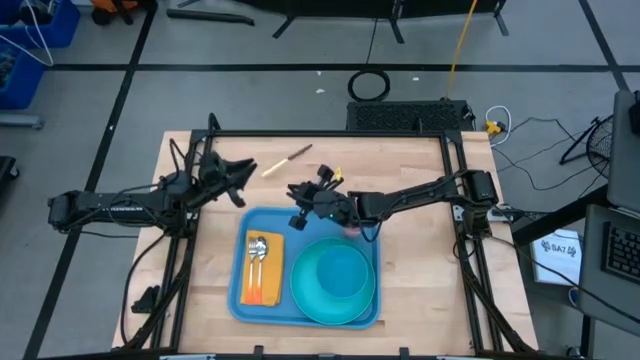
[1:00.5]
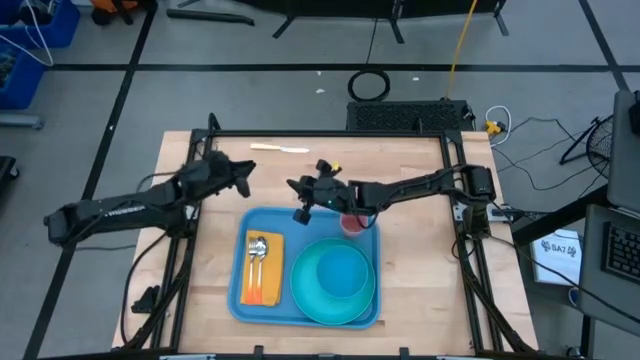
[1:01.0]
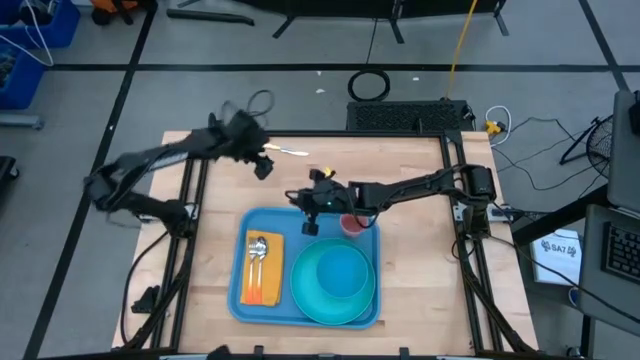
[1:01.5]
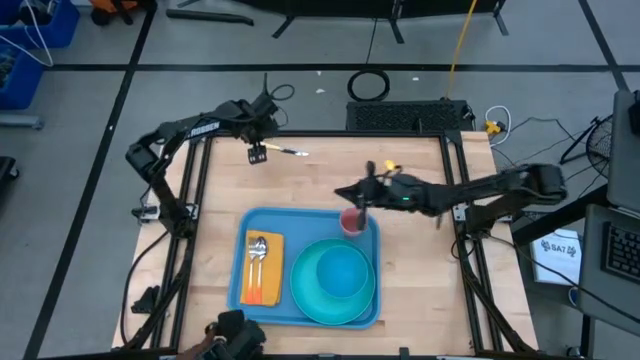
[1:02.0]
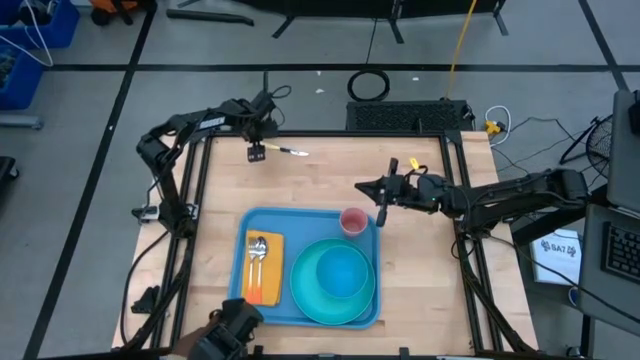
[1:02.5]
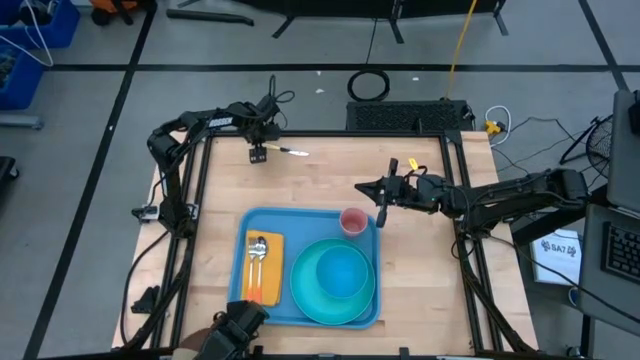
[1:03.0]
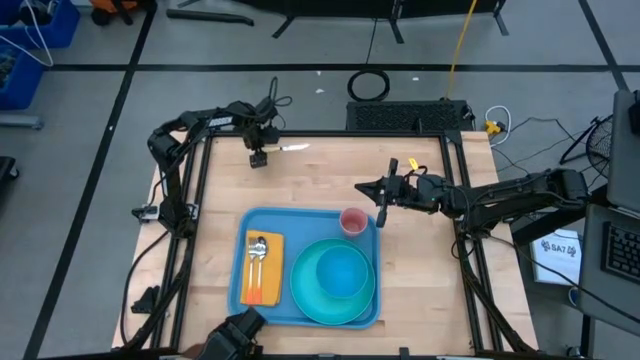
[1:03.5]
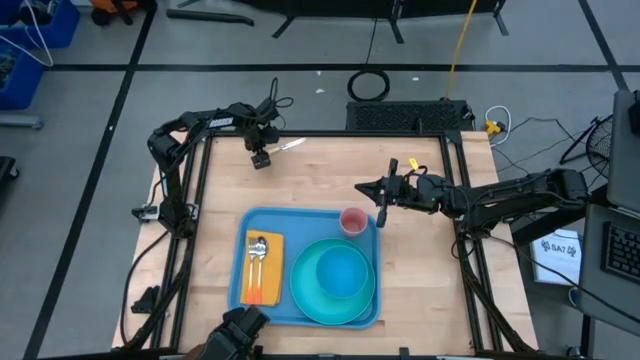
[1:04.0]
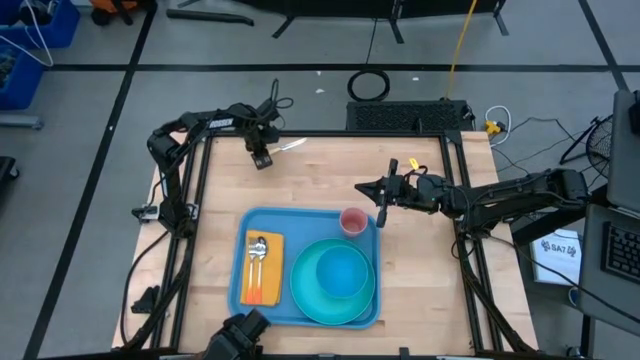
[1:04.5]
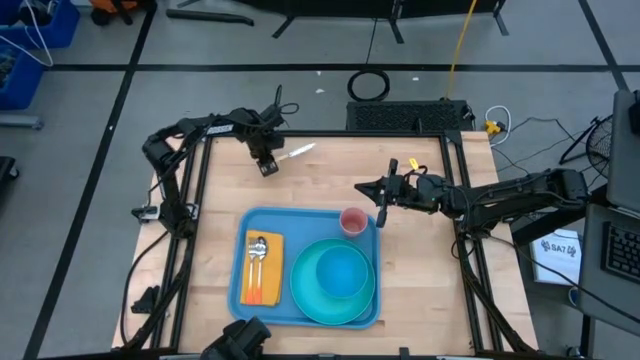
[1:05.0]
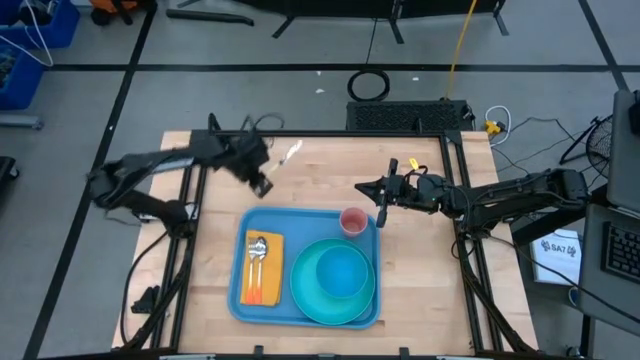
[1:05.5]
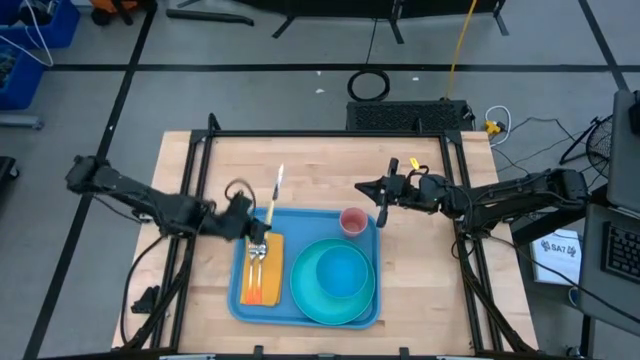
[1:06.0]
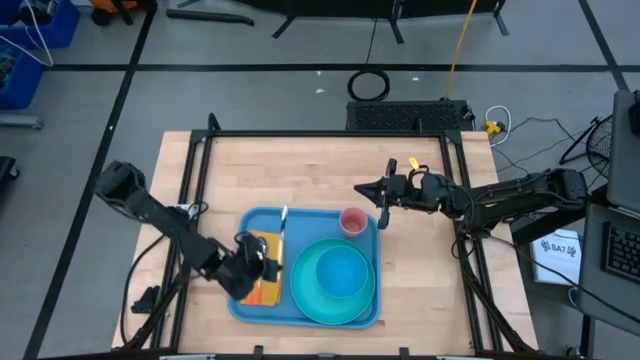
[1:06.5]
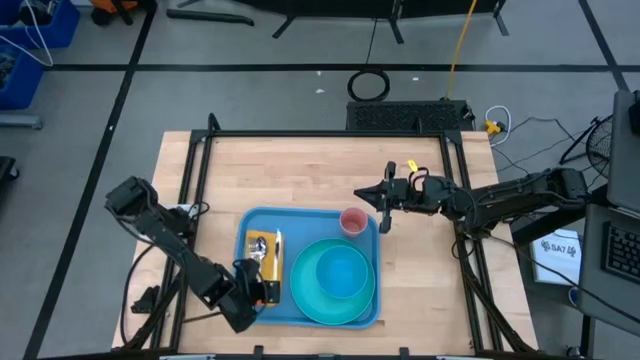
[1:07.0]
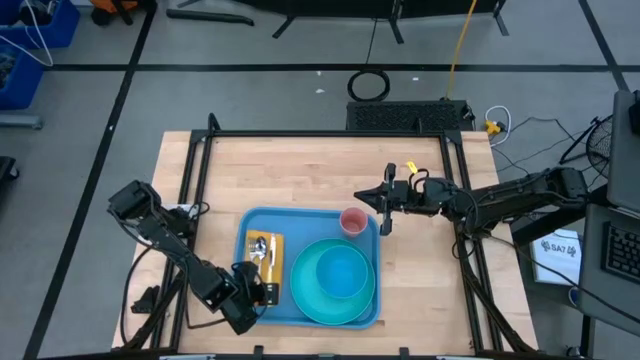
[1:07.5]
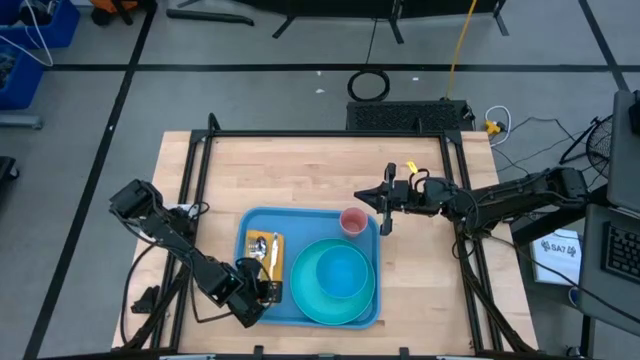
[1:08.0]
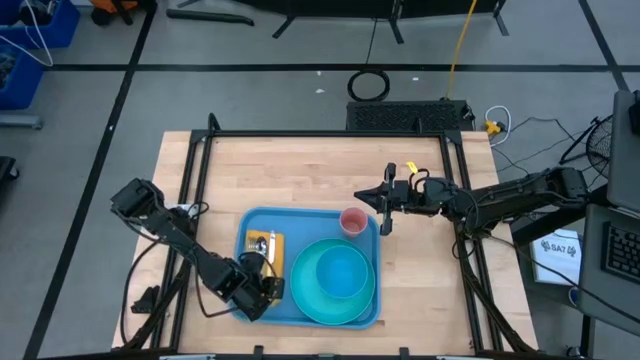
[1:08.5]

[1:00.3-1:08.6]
Task: Set up tray
Put the yellow knife on the yellow napkin to the right of the orange spoon

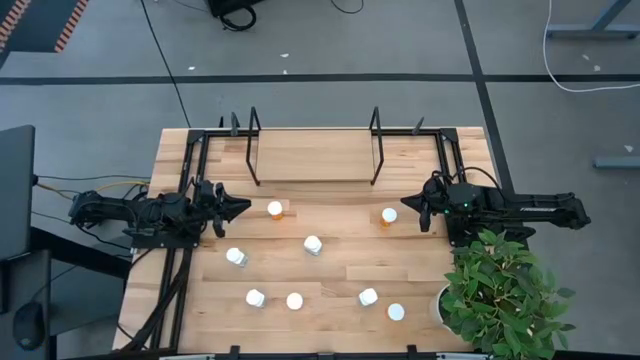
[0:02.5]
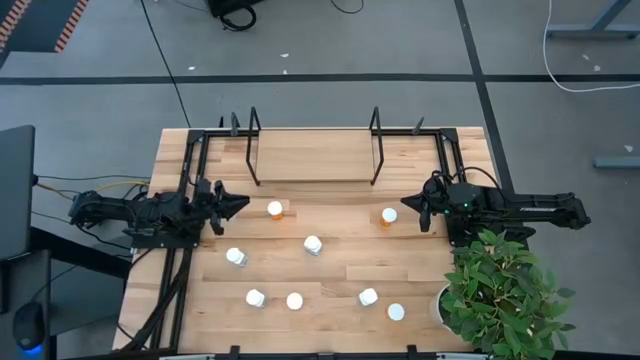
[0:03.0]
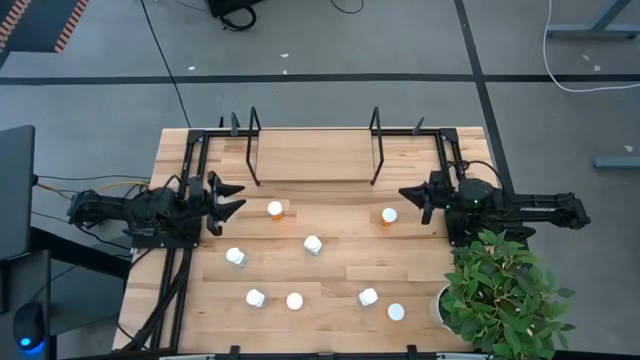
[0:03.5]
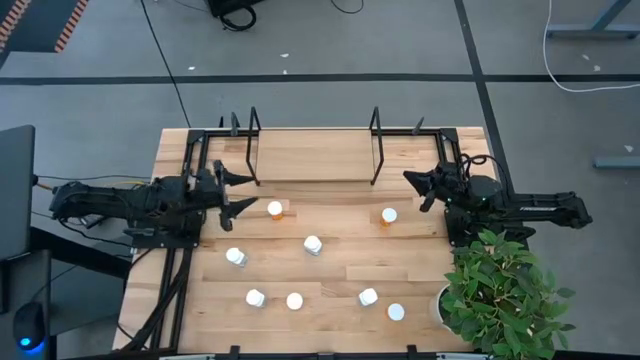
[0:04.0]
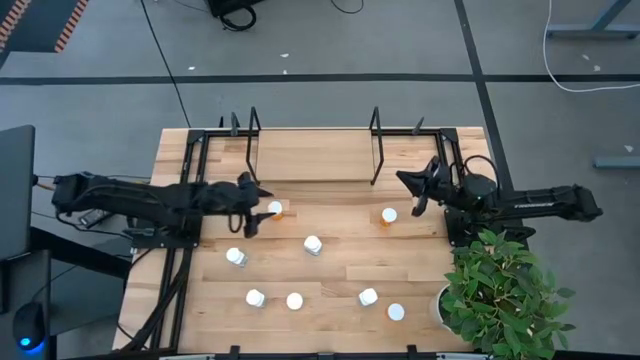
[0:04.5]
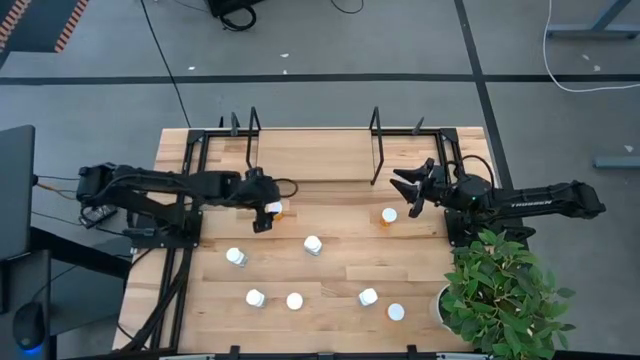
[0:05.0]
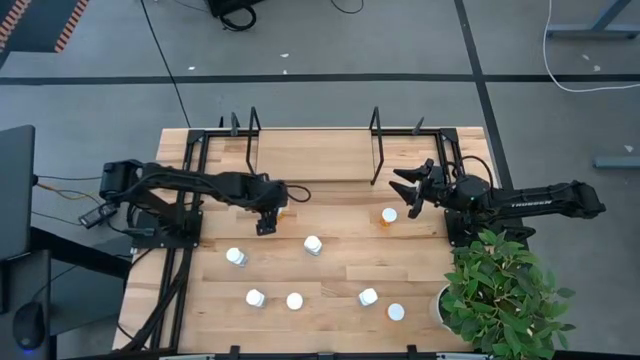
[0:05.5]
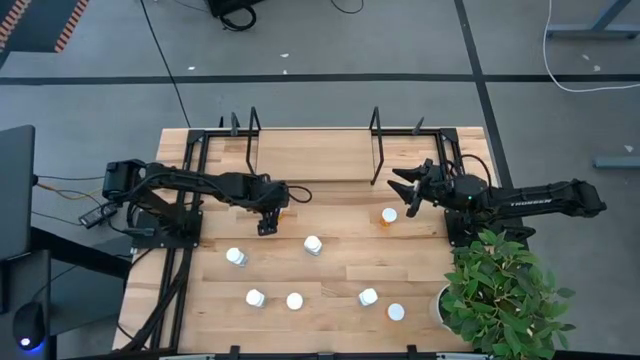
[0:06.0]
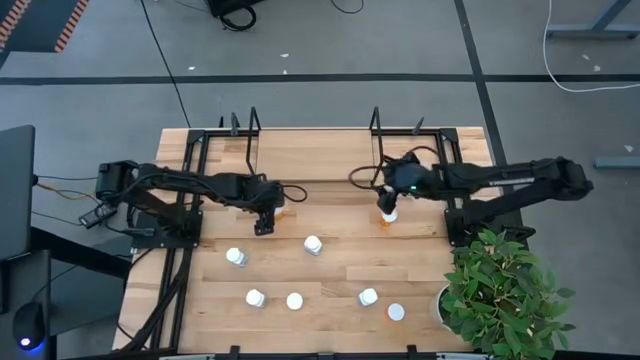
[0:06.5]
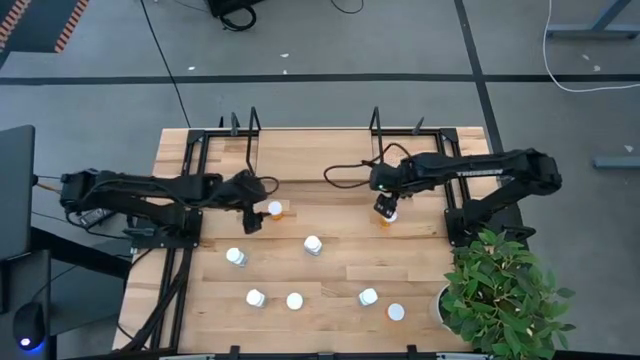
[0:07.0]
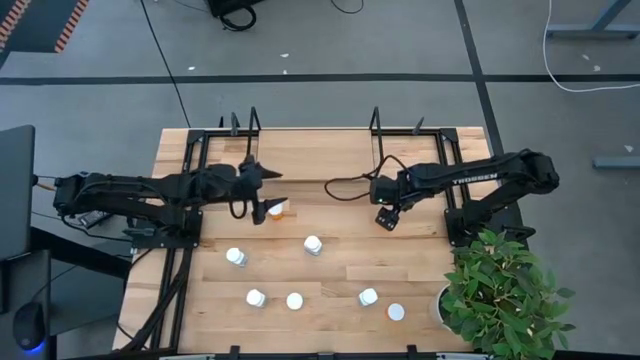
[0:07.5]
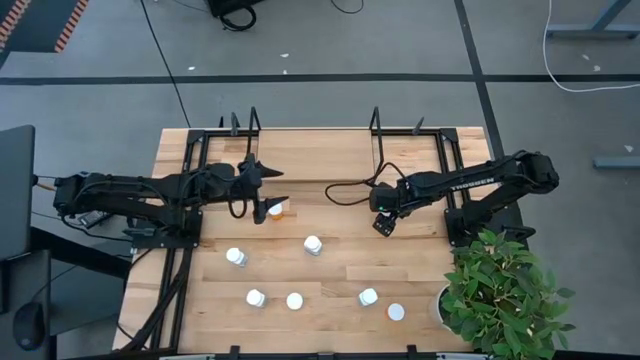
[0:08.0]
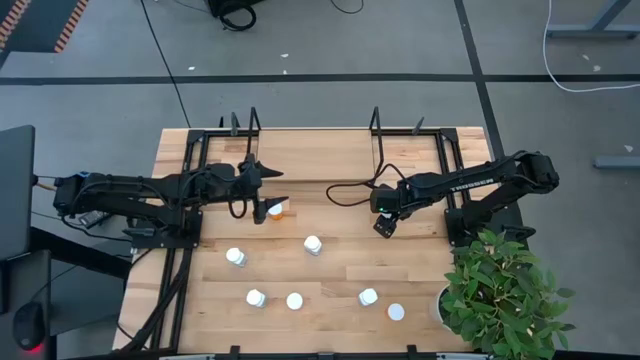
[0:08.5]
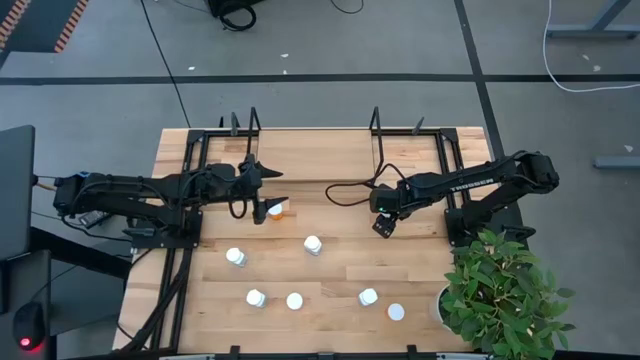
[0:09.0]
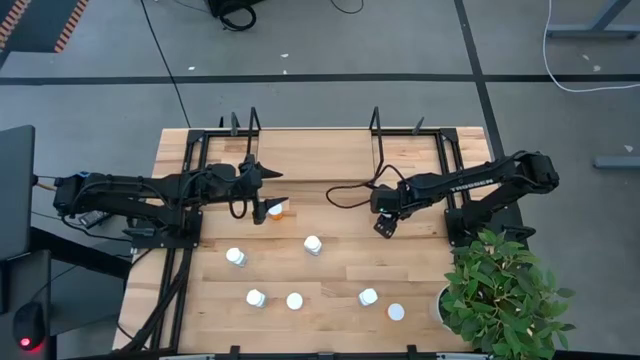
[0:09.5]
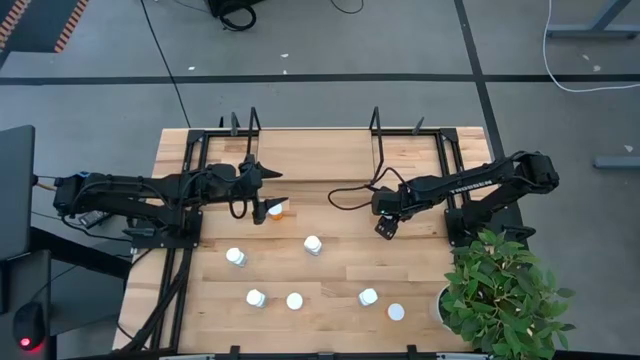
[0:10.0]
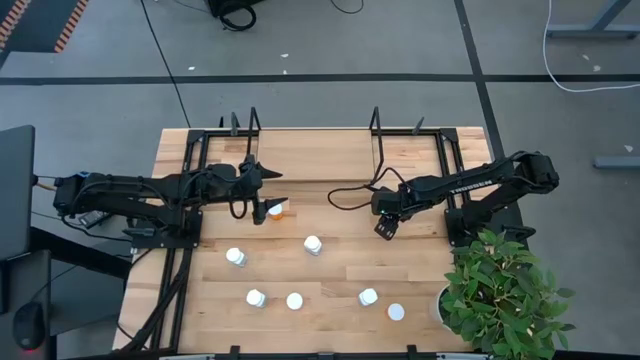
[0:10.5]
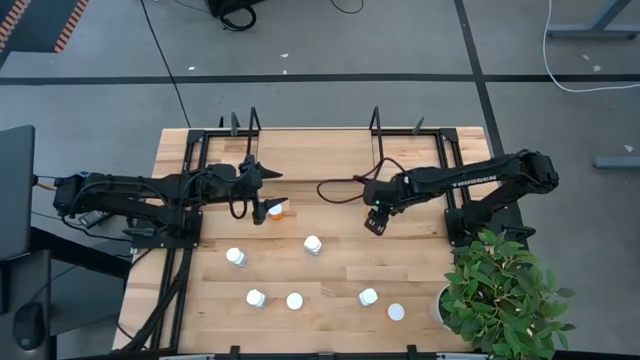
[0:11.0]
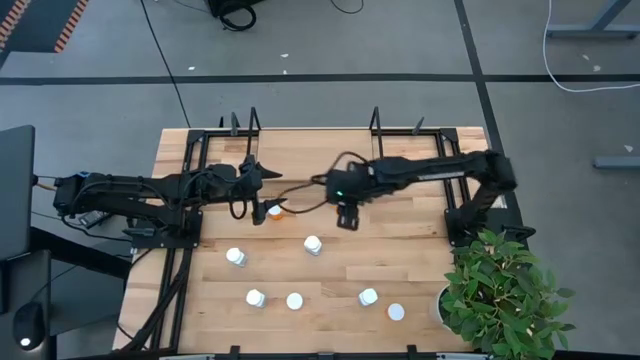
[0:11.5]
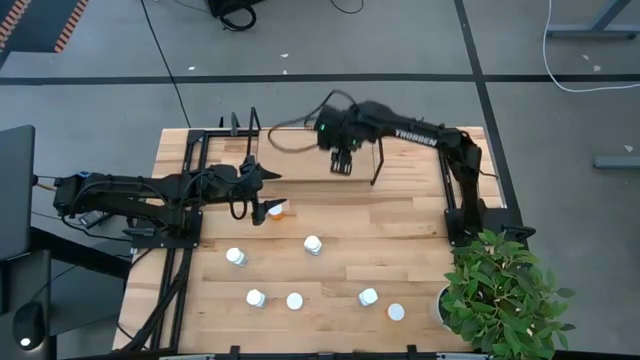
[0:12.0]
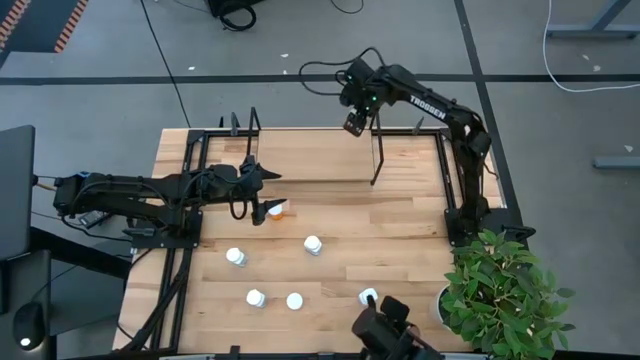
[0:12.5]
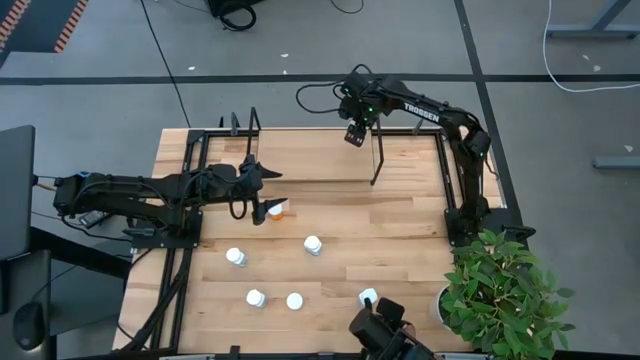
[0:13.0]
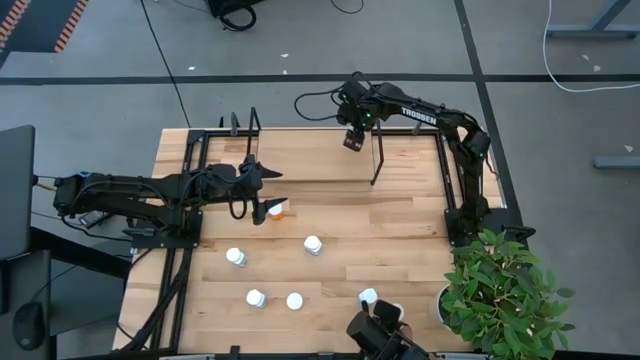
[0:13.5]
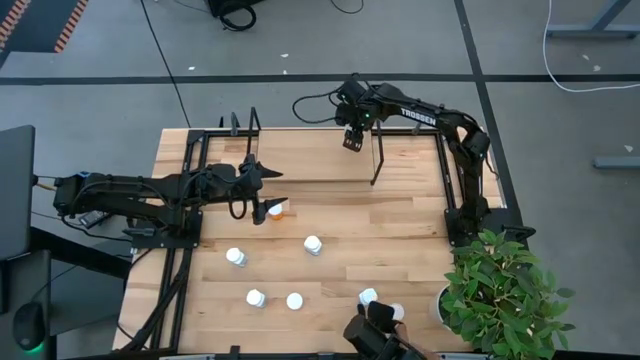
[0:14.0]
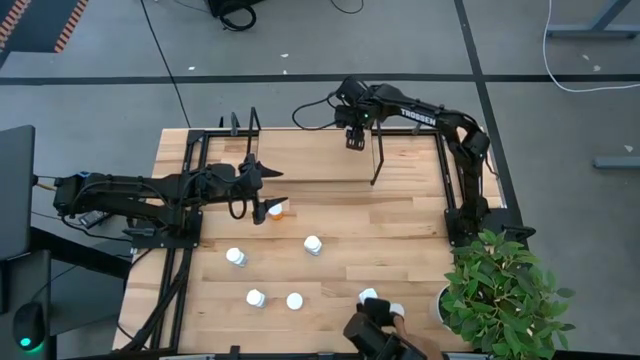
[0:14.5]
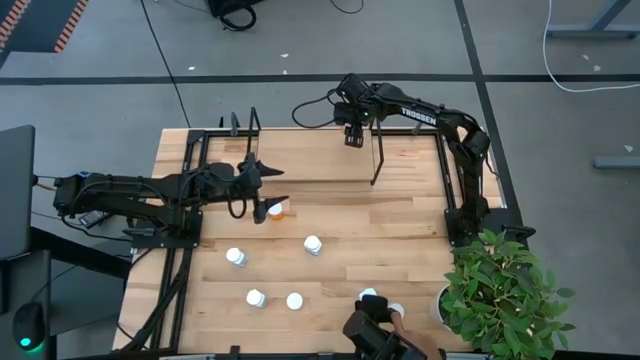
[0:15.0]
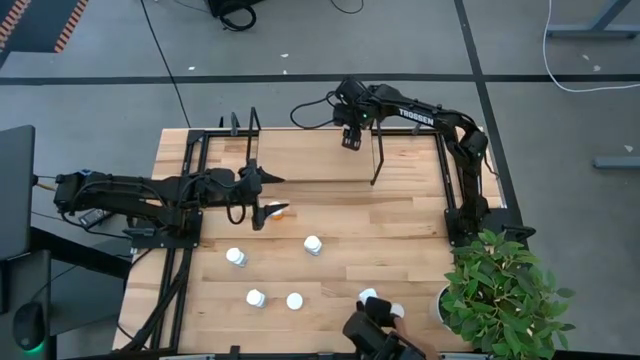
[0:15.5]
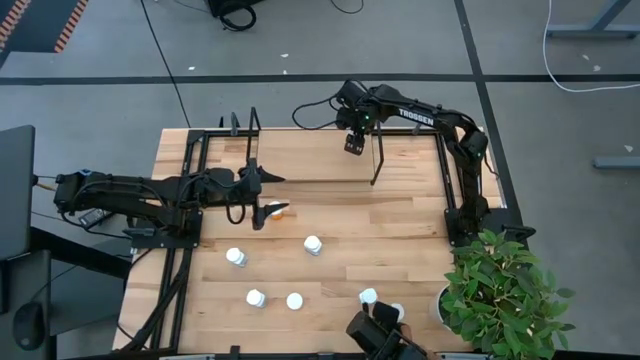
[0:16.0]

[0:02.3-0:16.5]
Task: Pick and place medicine bottles onto shelf by color
Put the orange pill bottle on the shelf
